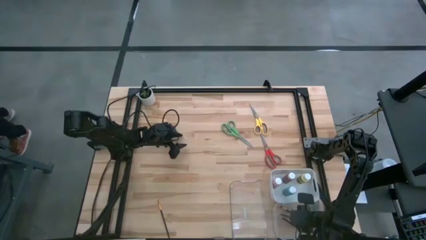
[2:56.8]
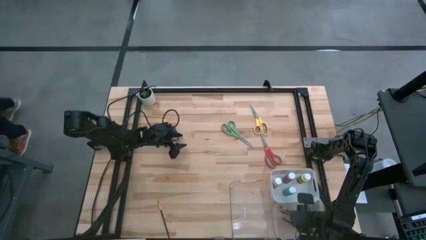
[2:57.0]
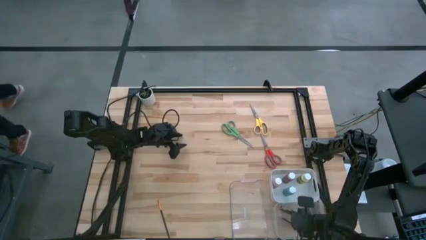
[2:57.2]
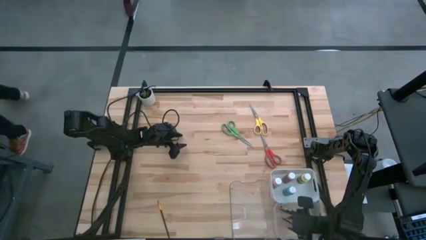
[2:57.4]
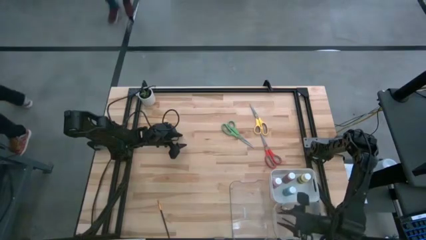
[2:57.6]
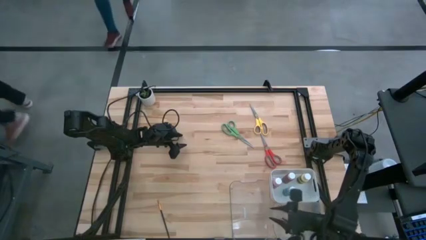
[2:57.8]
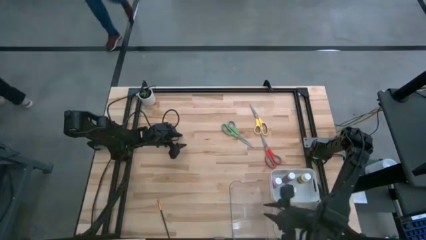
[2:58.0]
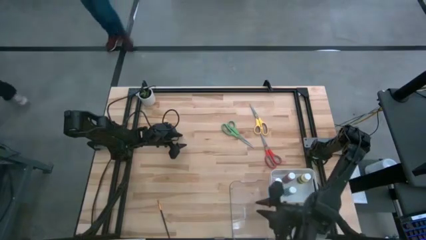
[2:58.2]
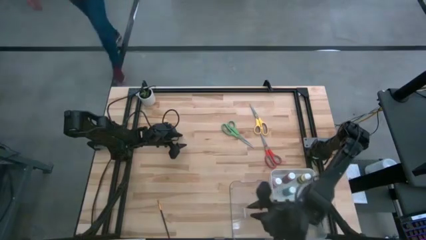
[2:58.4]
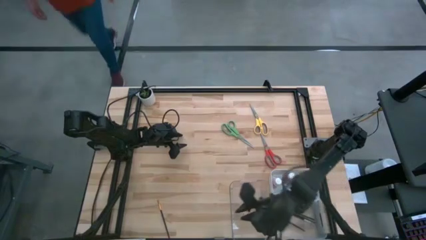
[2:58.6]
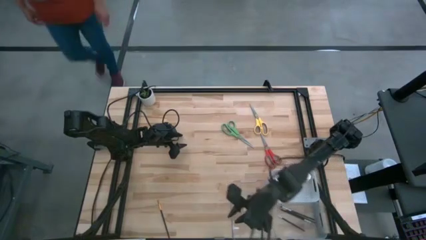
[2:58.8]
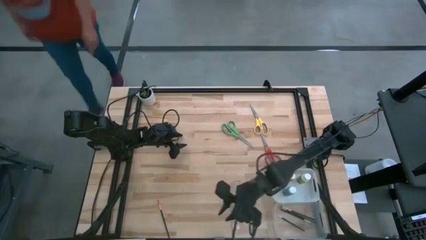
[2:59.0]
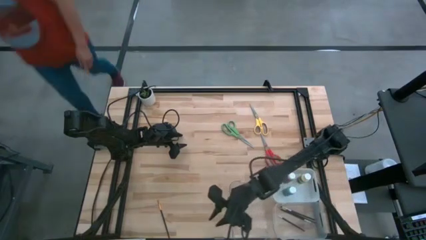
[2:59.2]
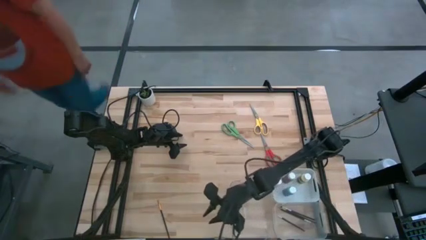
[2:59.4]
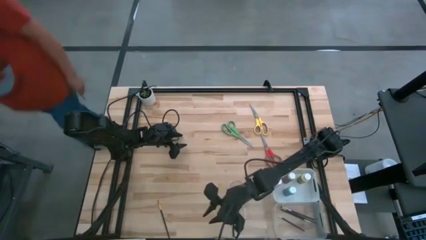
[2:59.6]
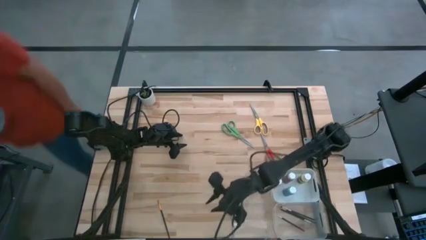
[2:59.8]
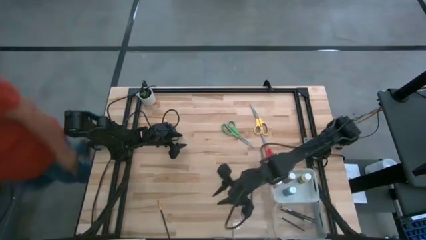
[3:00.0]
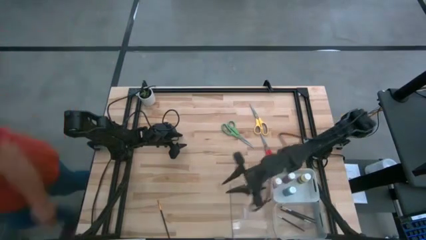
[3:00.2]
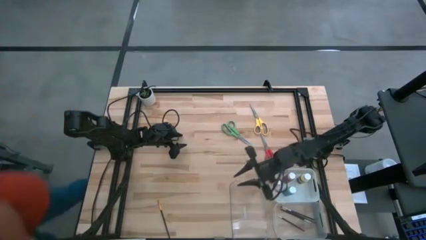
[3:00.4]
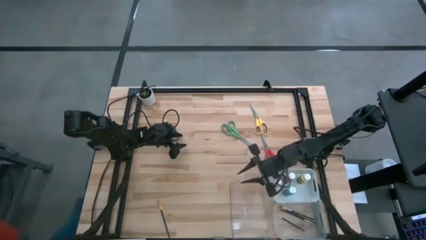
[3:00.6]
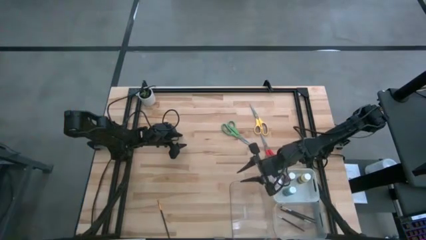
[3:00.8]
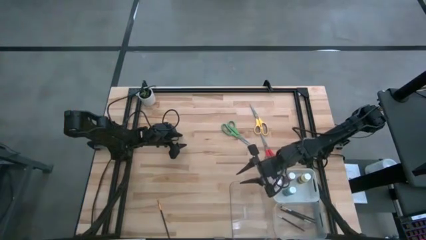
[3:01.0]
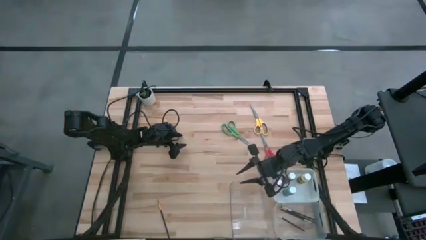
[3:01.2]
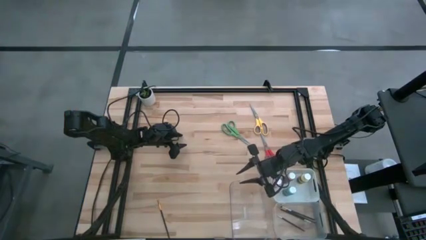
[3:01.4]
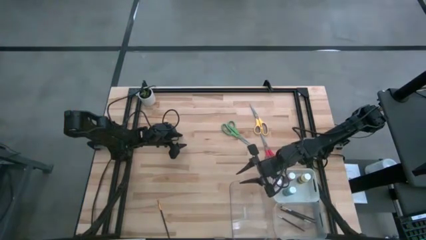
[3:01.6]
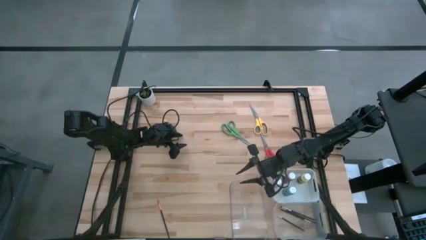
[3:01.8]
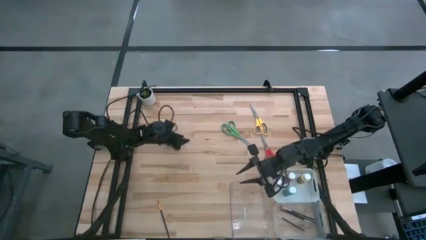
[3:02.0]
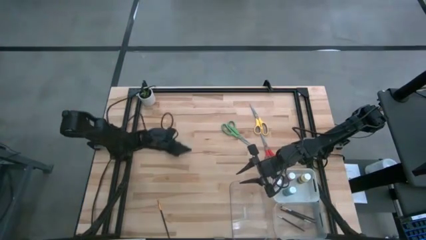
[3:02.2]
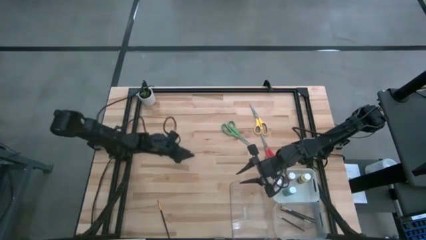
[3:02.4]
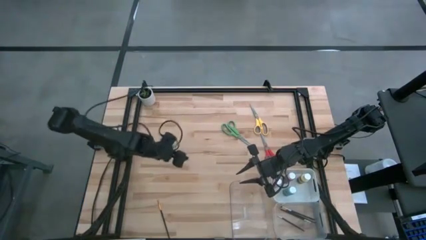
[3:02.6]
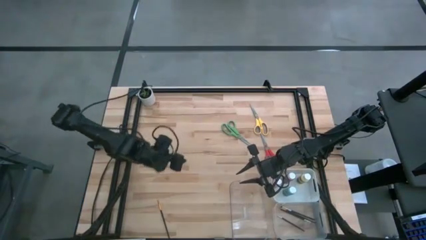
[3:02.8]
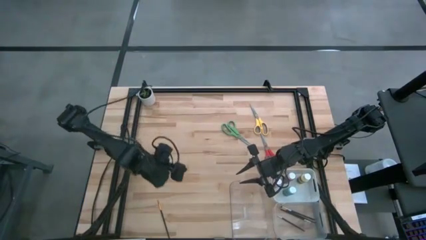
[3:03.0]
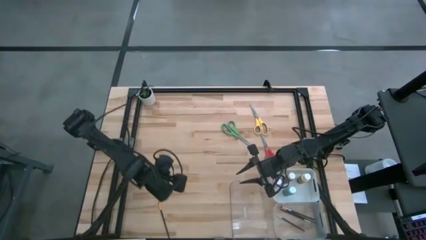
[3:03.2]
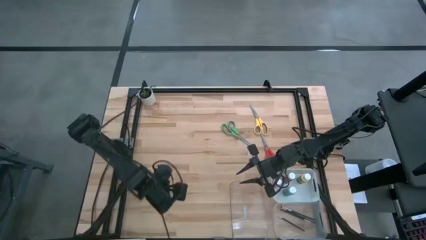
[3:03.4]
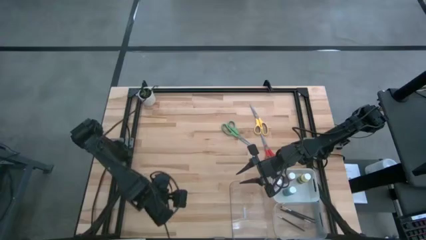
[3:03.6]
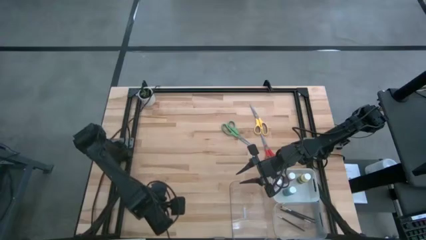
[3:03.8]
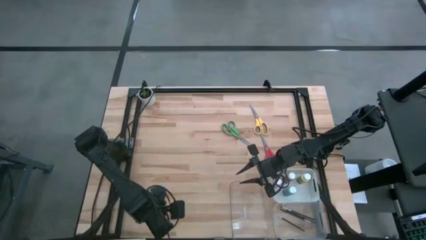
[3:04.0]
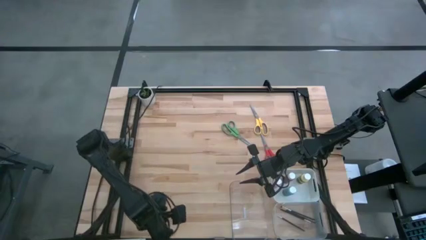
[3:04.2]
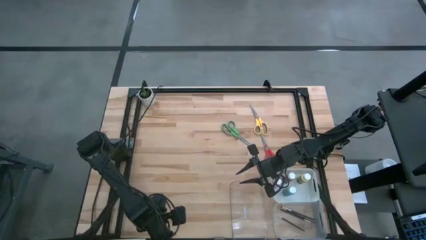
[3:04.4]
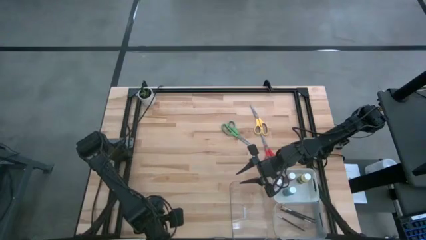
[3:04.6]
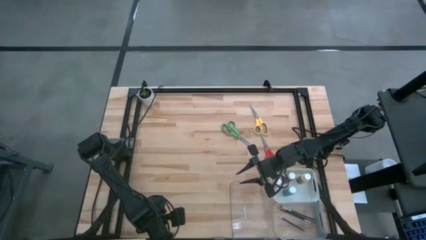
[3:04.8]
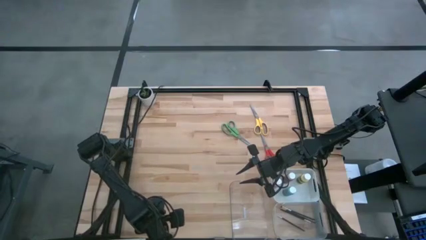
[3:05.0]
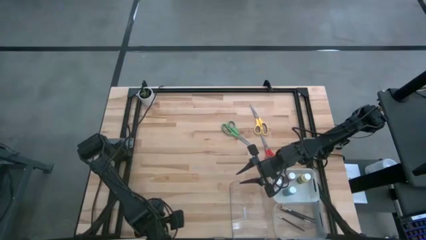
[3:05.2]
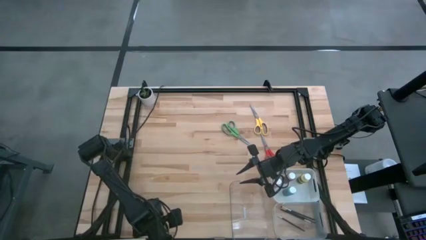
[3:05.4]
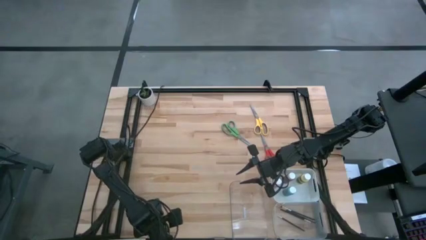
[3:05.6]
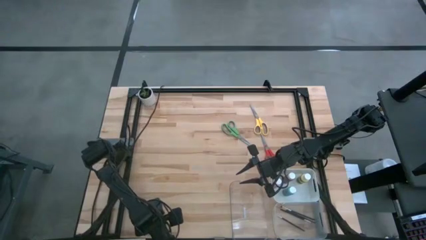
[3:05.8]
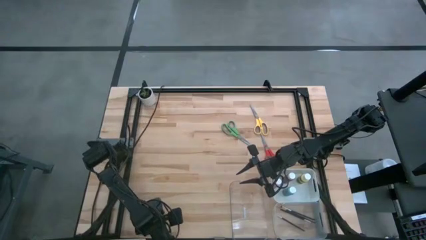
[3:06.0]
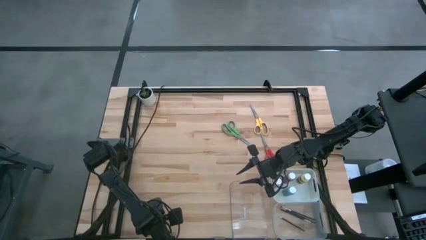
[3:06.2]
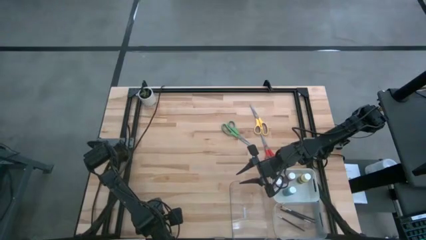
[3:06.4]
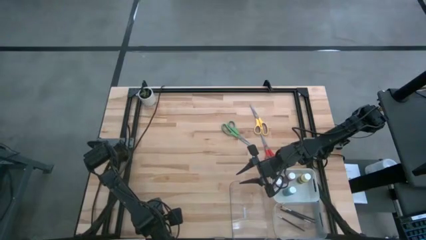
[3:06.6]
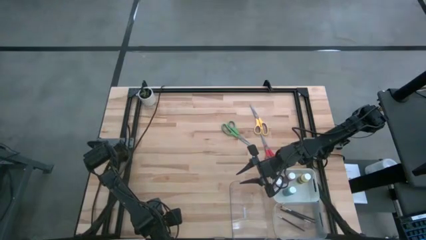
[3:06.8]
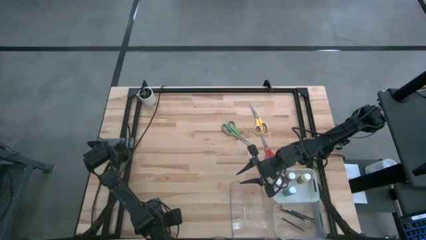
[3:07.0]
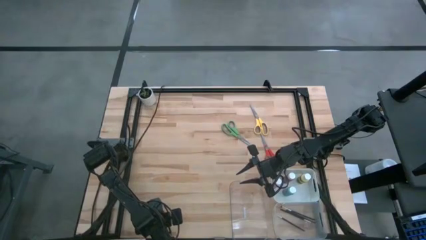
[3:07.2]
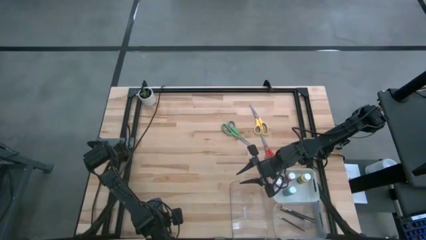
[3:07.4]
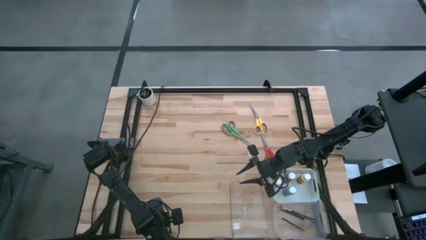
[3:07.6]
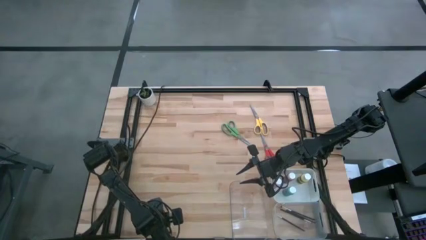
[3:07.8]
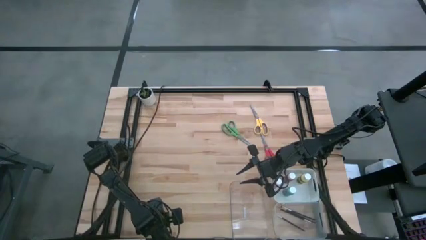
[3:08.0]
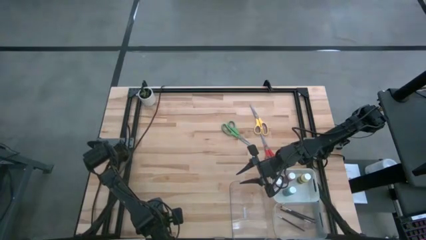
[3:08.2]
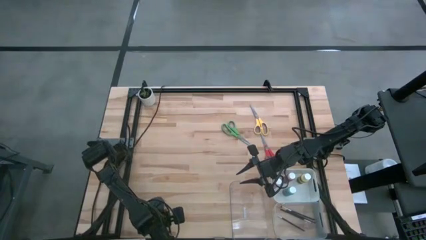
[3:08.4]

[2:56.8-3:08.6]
Task: Pick & Place Paint Supplies
Put the gold paintbrush into the right transparent bin

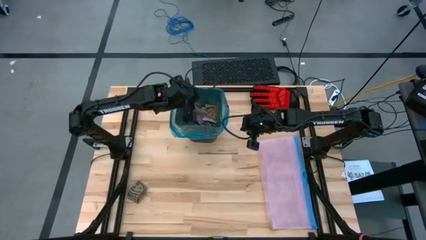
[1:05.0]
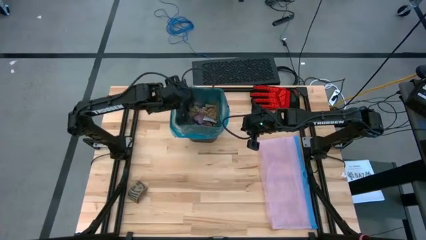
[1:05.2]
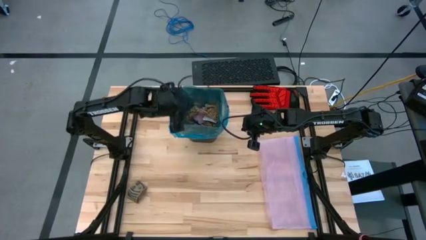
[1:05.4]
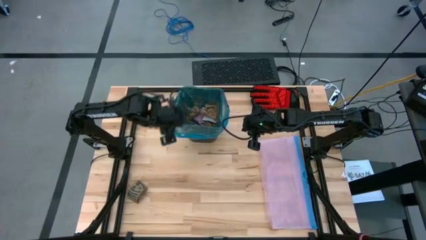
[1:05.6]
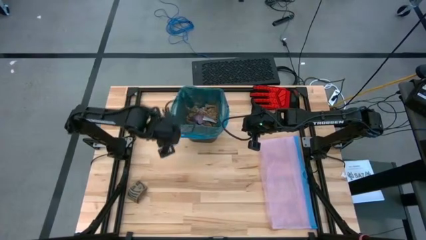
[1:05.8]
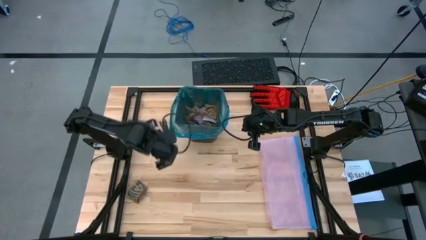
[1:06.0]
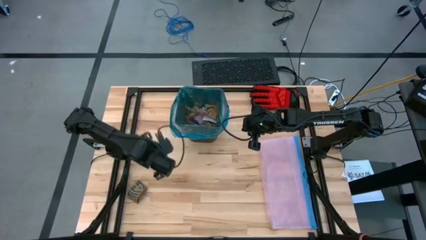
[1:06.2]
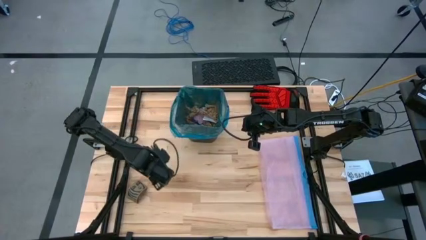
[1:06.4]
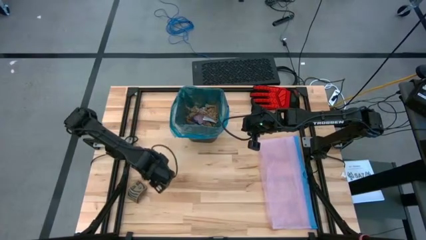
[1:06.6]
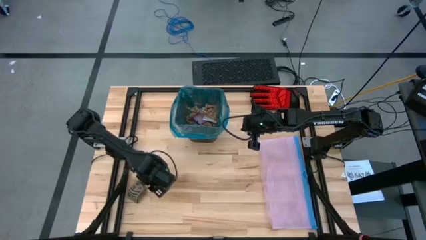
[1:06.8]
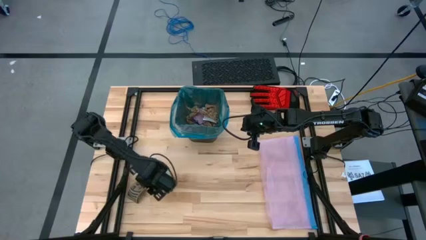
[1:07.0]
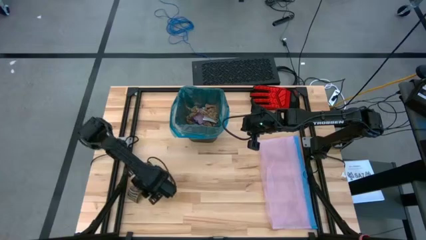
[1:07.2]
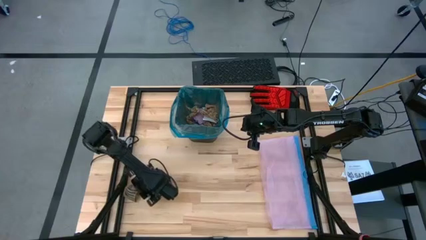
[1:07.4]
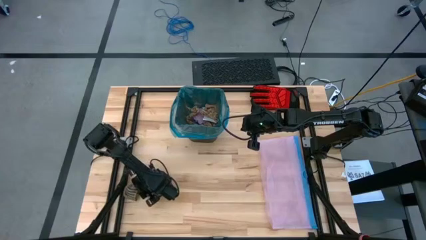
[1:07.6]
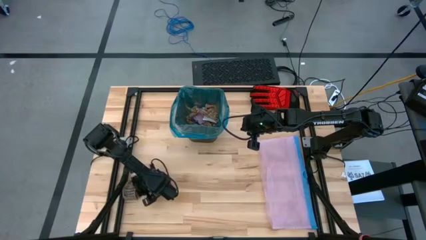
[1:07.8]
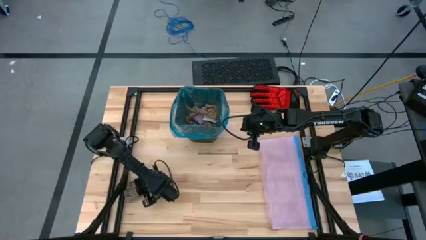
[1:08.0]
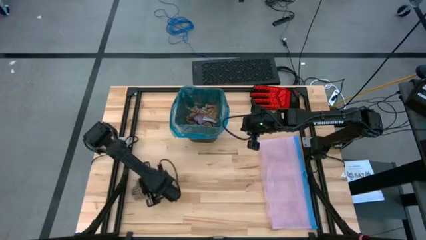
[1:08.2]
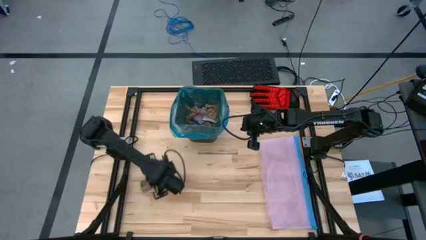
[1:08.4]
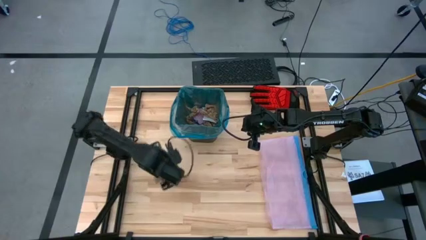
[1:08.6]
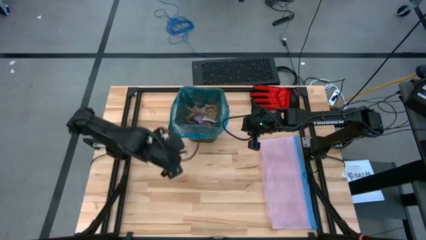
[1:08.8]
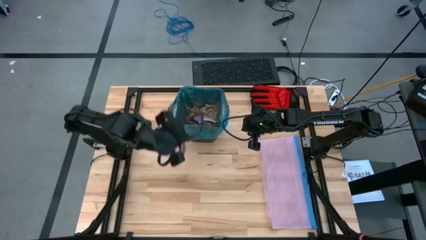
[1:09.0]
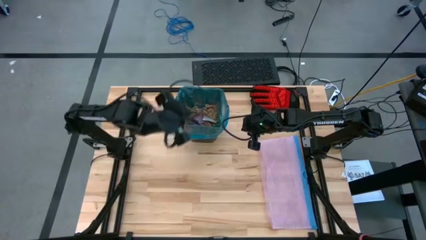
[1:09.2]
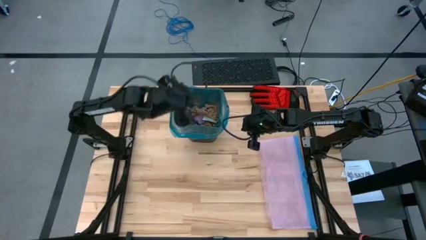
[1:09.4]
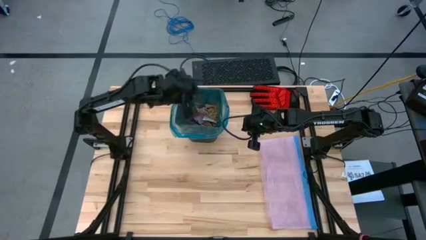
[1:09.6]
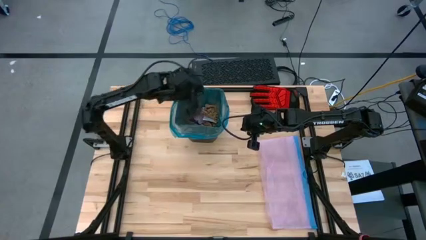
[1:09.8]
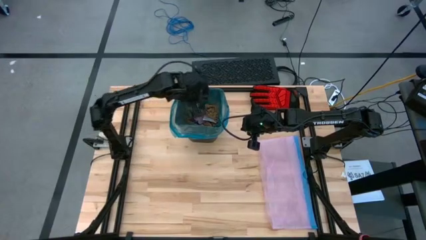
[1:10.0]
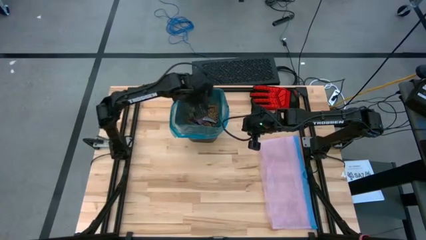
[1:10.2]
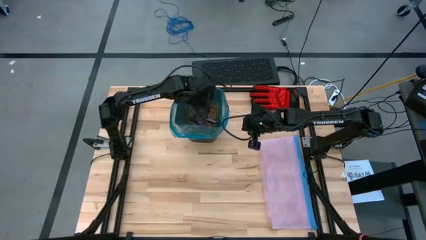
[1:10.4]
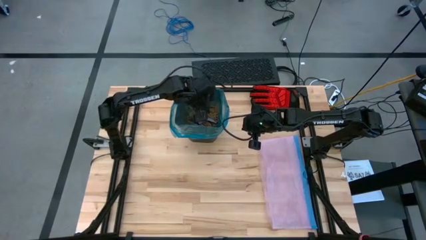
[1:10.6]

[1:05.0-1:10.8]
Task: place trash/remove bag and relplace
Put the cardboard coffee sleeve into the black trash bin
